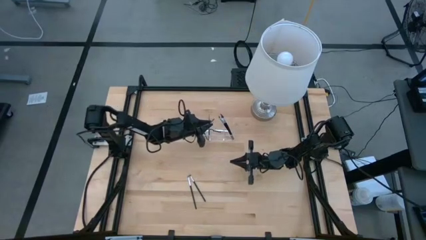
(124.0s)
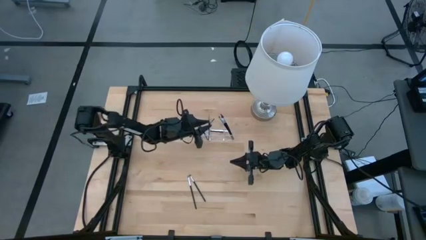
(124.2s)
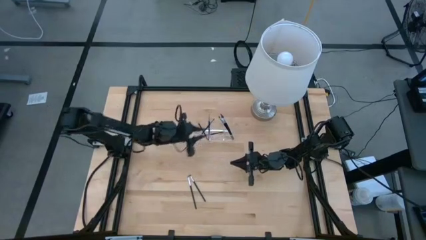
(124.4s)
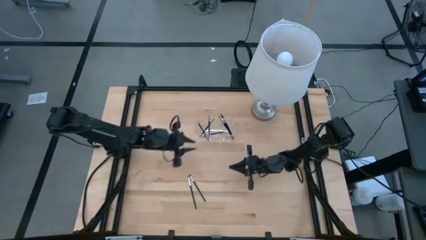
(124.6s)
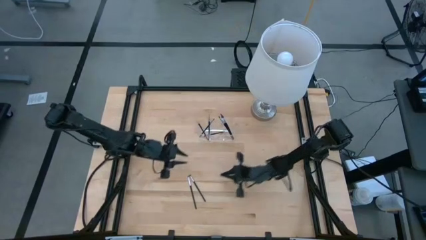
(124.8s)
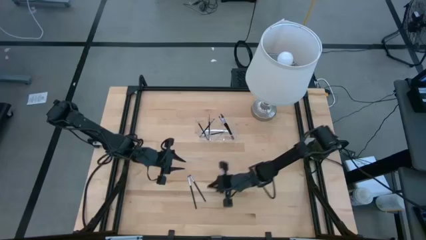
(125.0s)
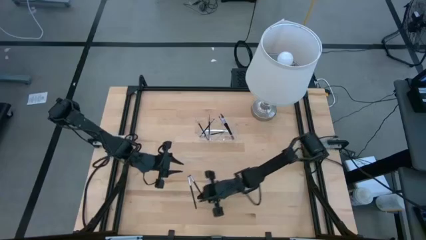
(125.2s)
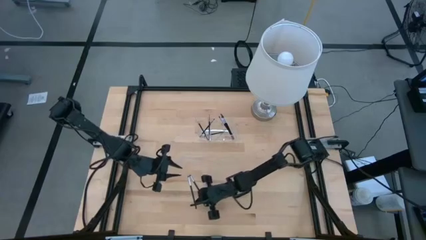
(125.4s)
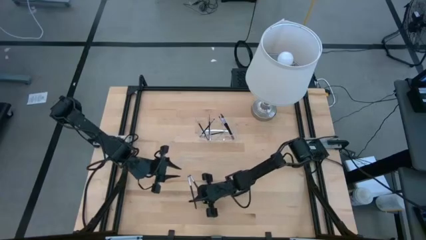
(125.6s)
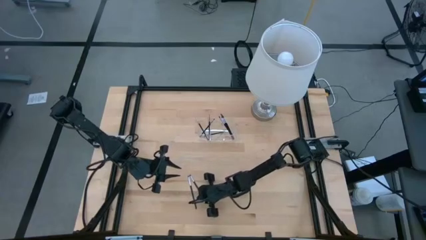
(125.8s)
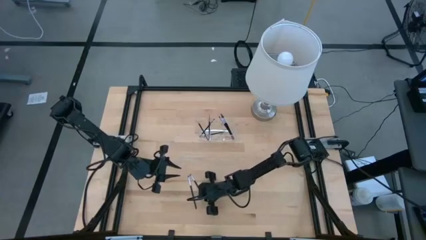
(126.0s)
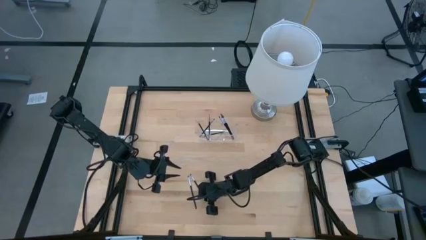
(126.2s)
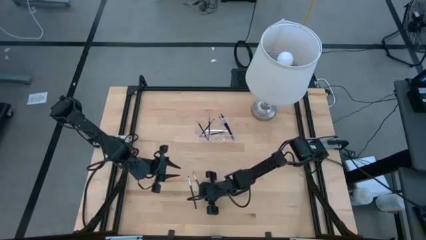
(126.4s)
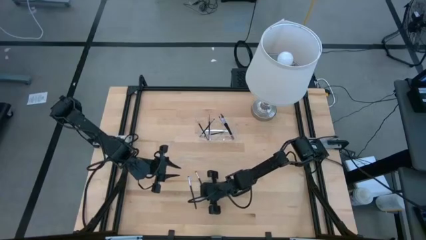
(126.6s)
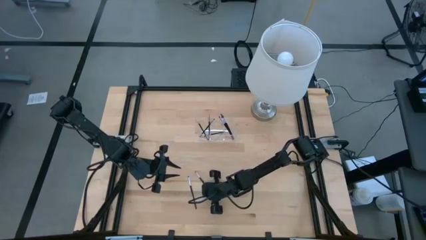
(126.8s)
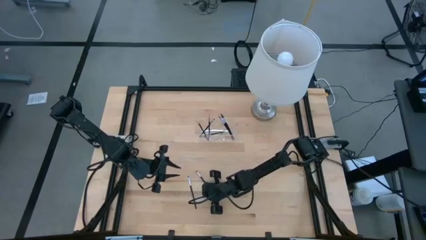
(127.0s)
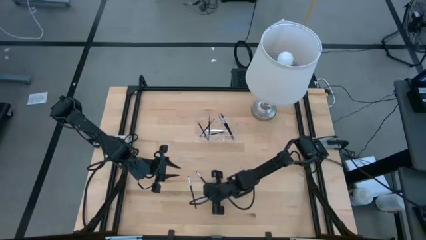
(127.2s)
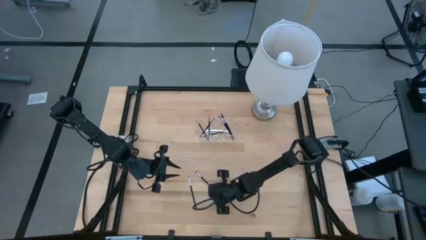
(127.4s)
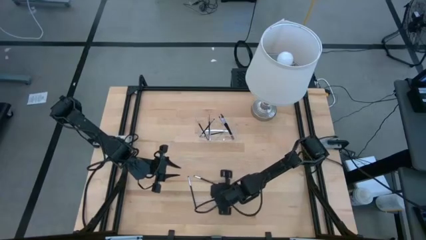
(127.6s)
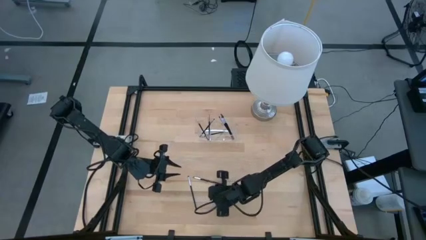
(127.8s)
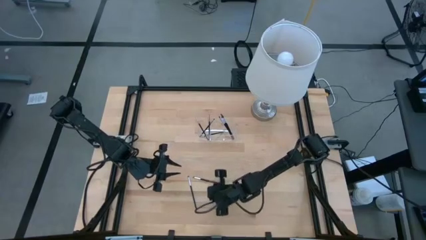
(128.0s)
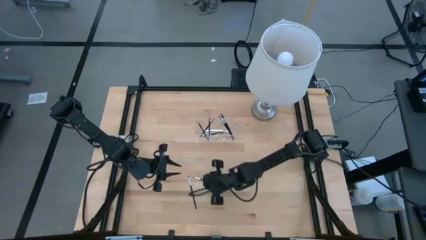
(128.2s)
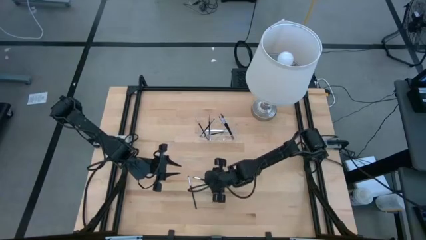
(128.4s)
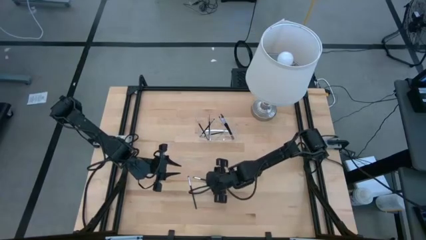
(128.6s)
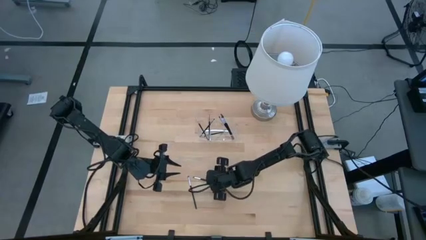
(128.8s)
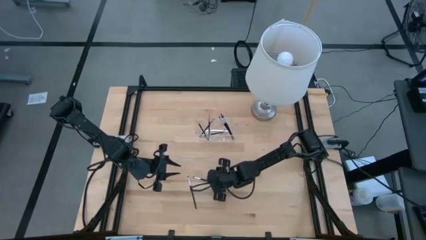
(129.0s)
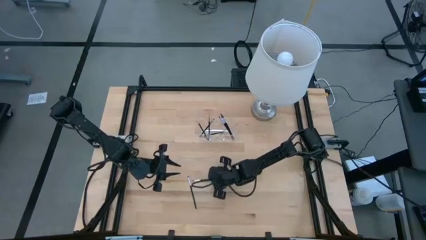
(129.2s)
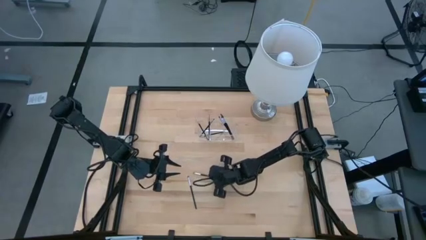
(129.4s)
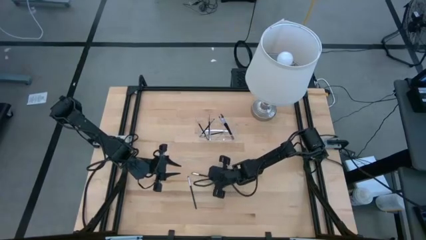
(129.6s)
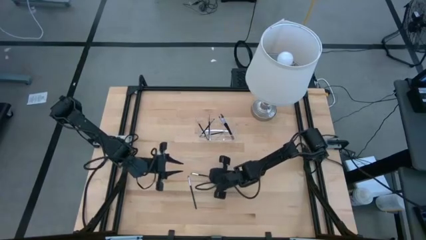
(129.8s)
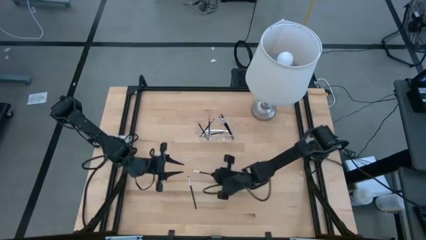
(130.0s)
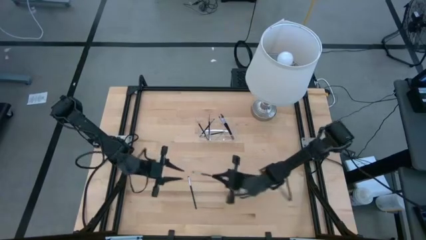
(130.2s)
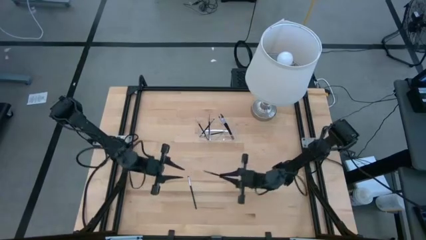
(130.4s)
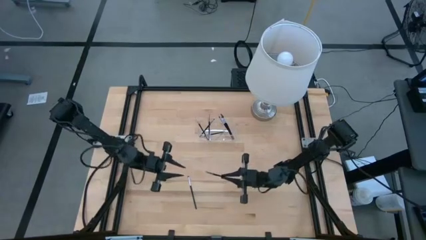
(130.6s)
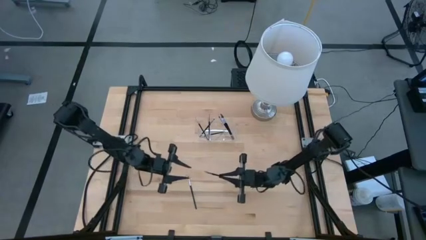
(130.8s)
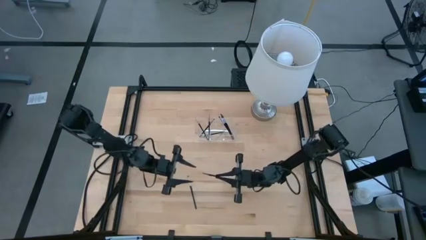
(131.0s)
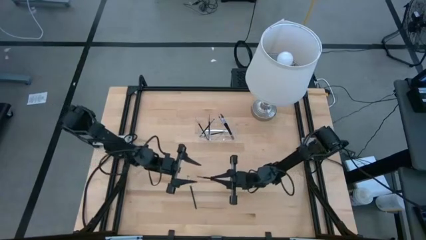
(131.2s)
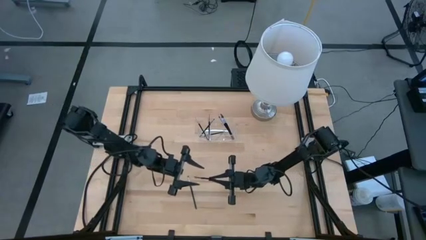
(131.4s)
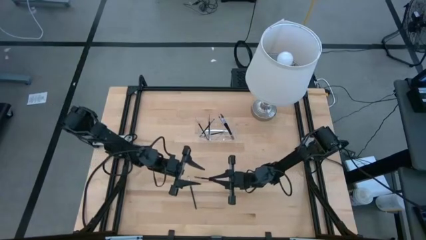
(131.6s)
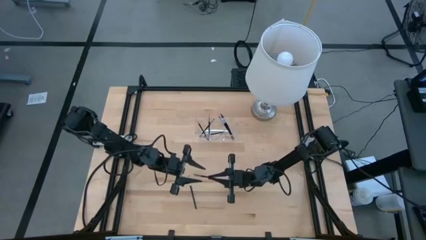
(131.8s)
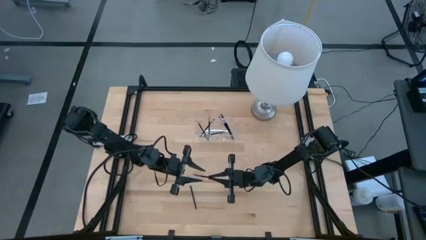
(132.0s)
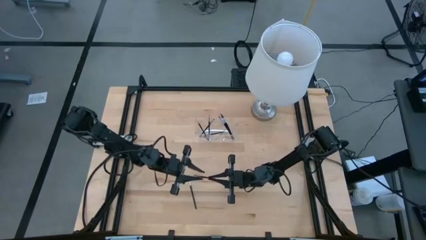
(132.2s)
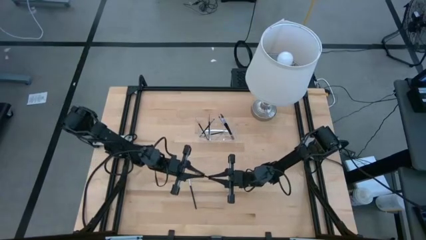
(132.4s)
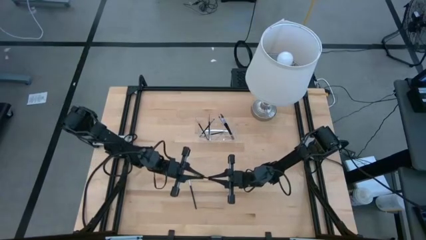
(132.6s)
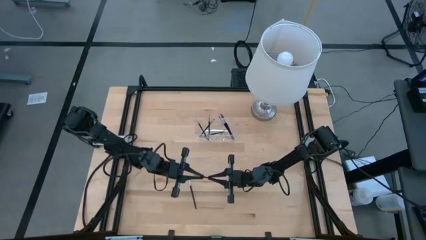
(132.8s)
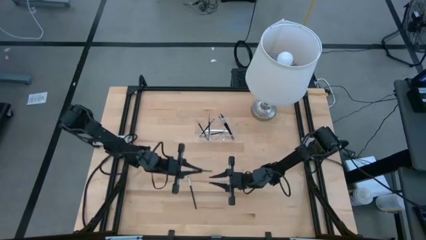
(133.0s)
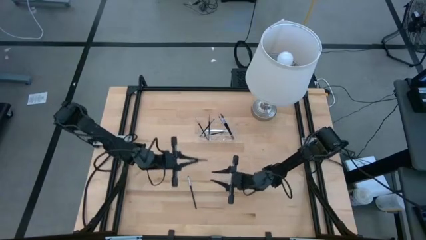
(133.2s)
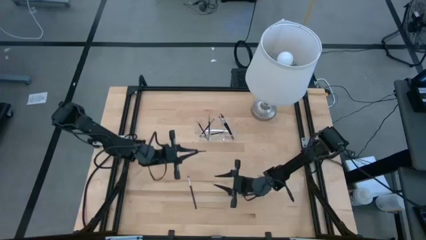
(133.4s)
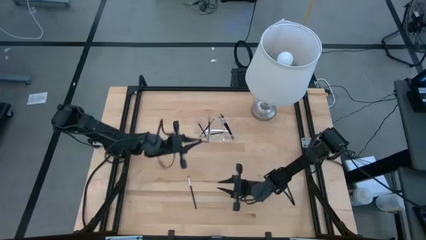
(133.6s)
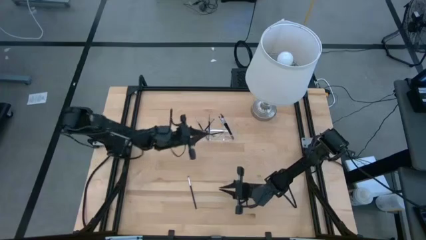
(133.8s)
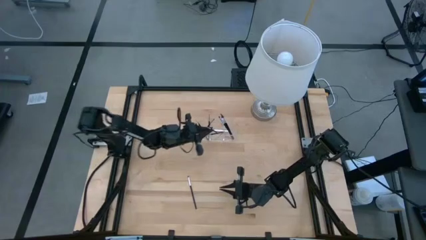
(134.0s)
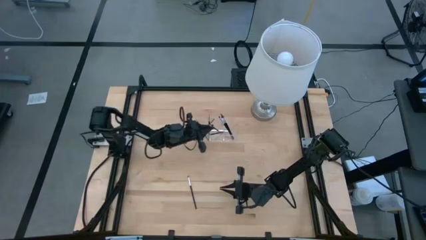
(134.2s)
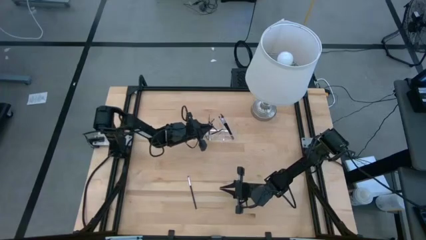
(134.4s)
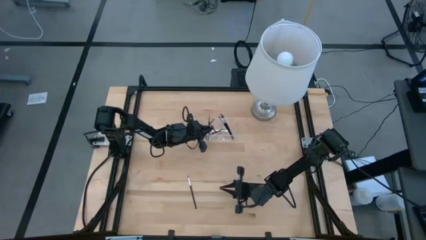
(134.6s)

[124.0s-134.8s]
Task: Put items in baskets/containers
Put the black foundation brush transparent organizer

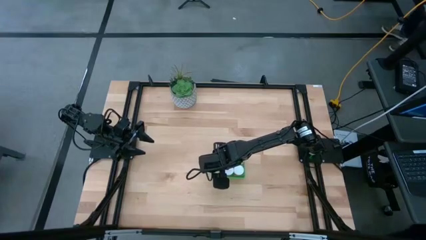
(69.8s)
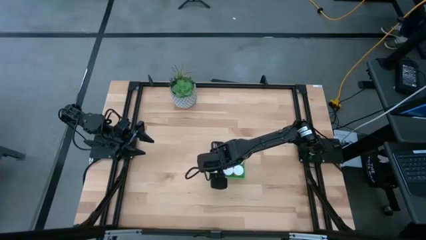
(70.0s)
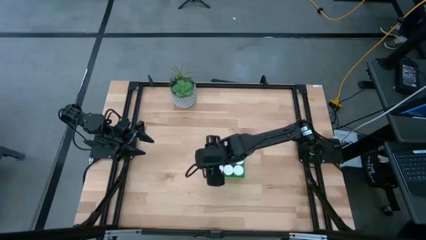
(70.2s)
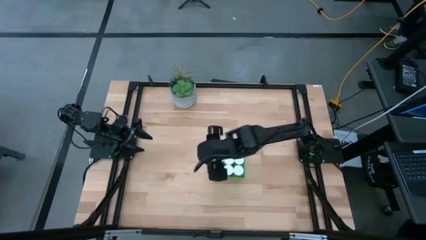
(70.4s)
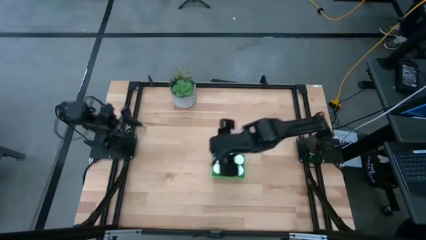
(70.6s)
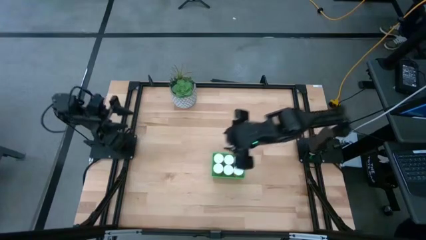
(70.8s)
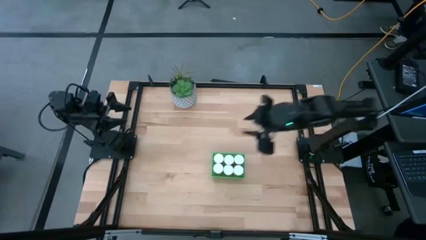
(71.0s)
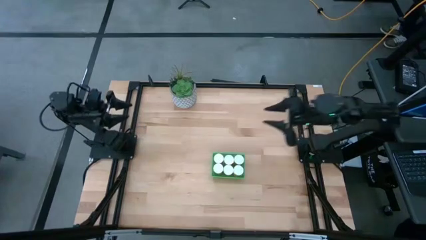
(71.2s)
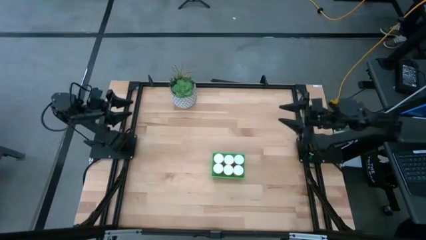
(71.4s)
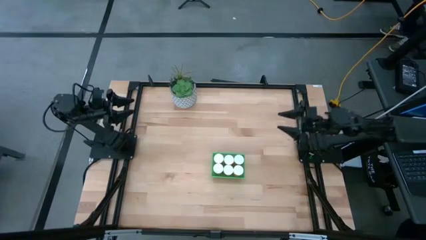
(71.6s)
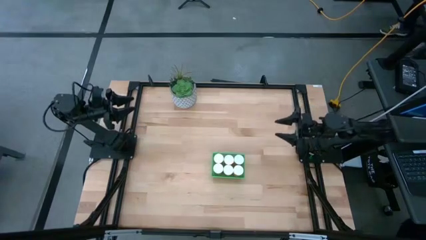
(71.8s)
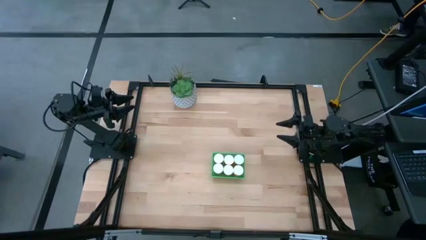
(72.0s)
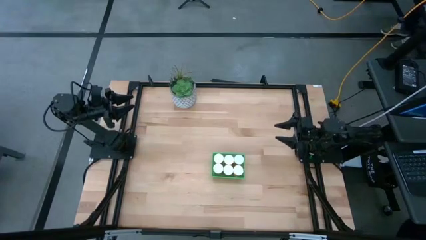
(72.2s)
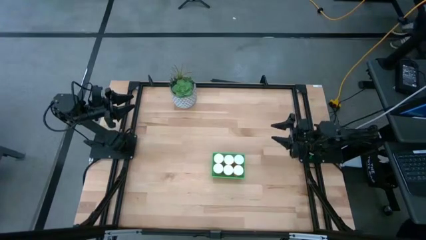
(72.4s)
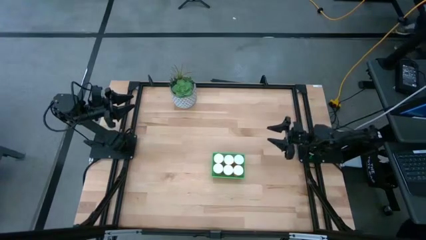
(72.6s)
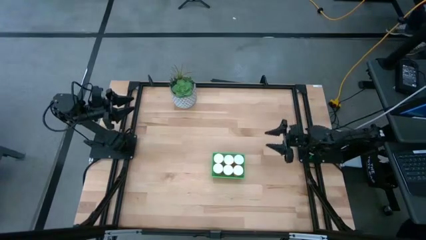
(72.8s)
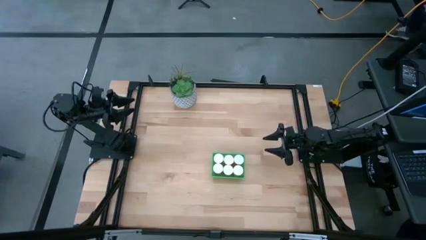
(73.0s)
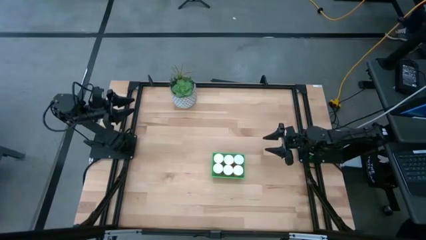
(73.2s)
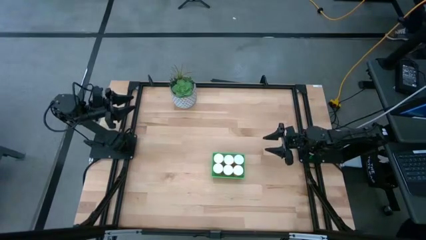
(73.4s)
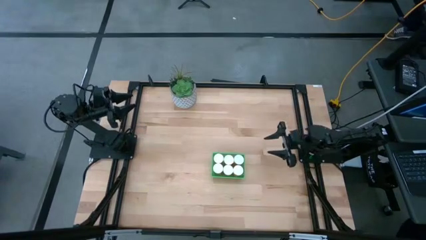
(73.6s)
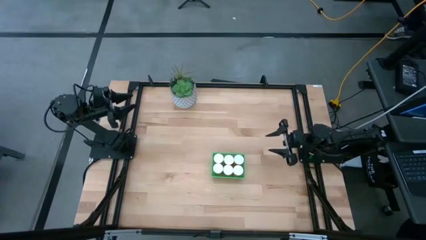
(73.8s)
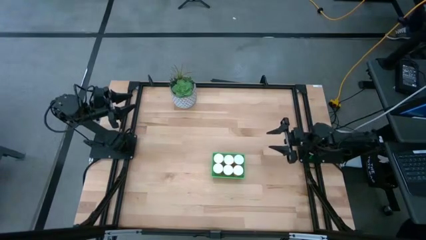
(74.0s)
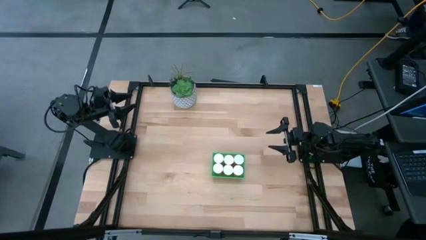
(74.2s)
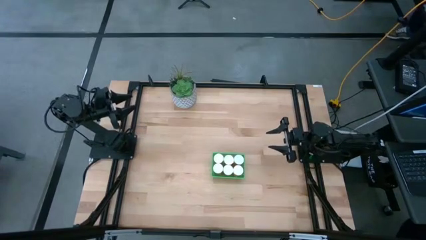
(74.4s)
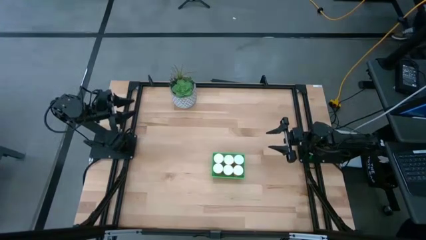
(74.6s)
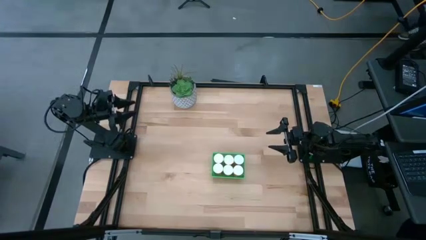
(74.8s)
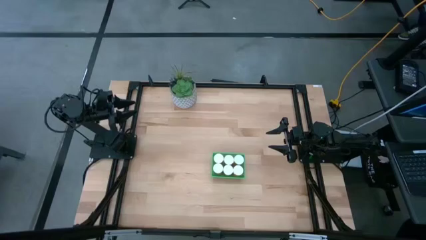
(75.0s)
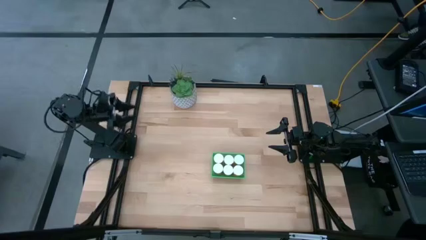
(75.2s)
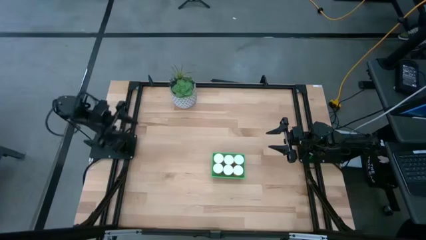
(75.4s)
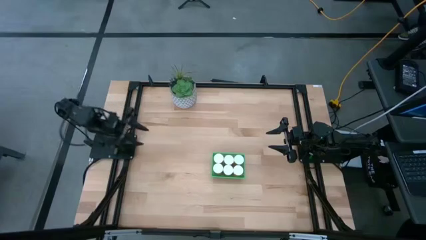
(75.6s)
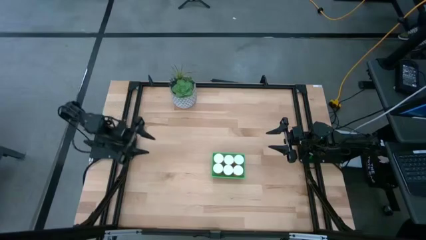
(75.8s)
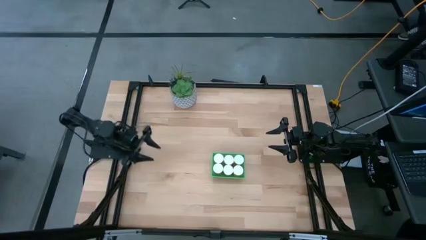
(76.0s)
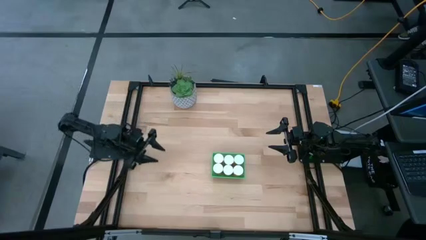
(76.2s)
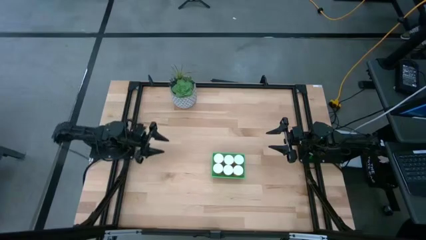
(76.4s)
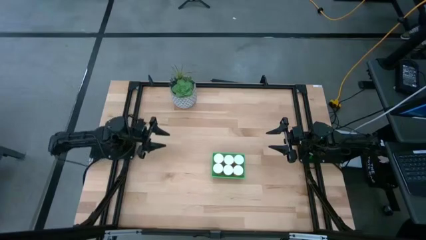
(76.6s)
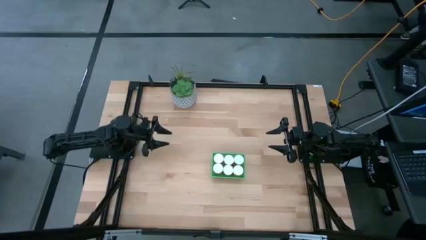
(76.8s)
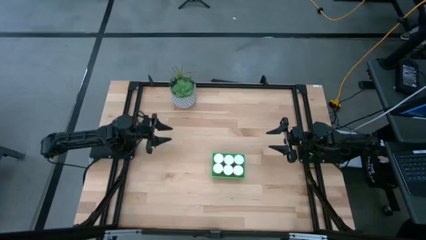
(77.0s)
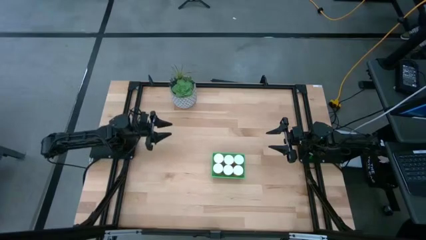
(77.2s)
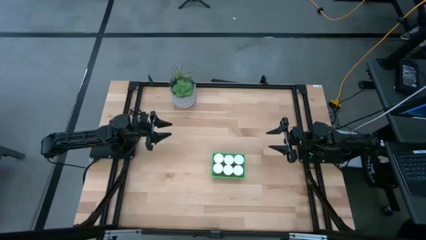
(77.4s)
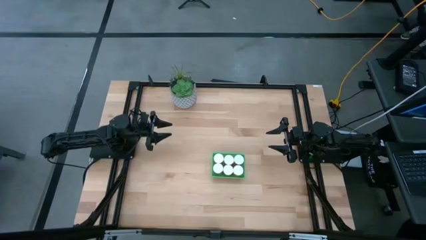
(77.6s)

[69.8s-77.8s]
Task: Pick and place pill bottles into a basket
Return to Home Position
